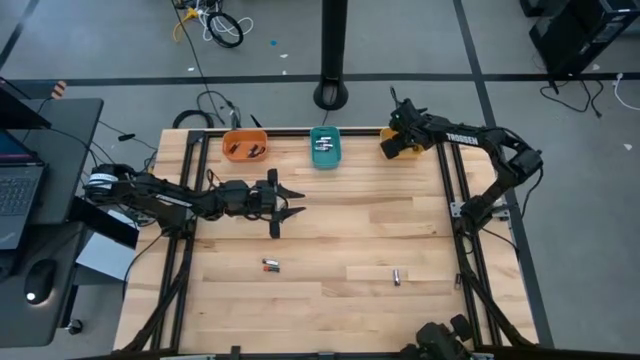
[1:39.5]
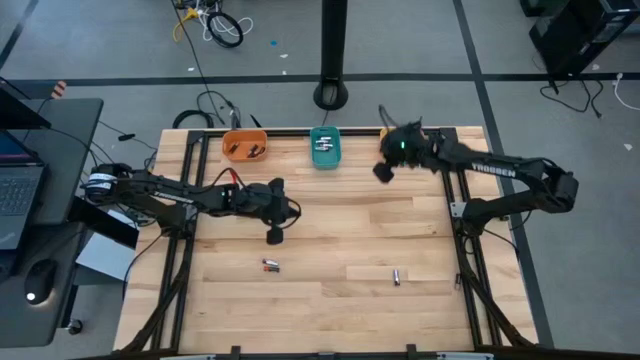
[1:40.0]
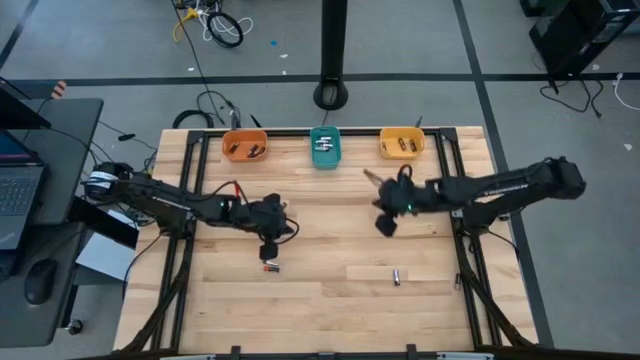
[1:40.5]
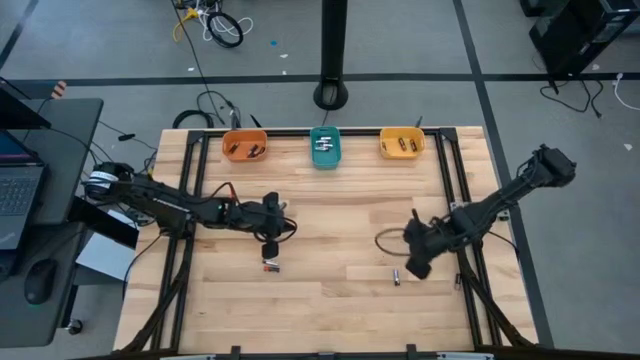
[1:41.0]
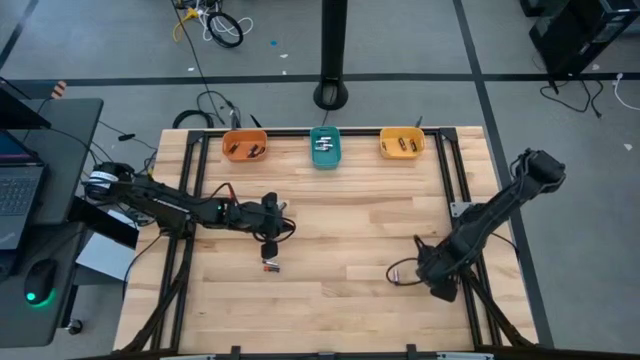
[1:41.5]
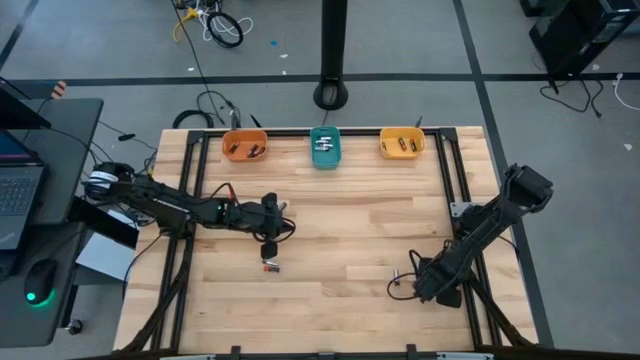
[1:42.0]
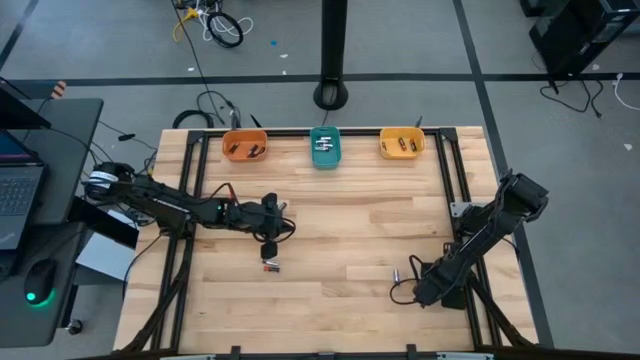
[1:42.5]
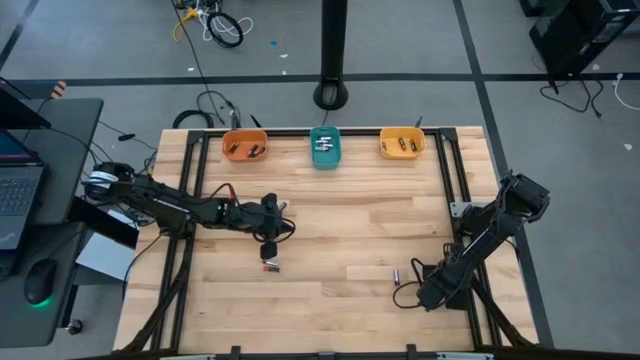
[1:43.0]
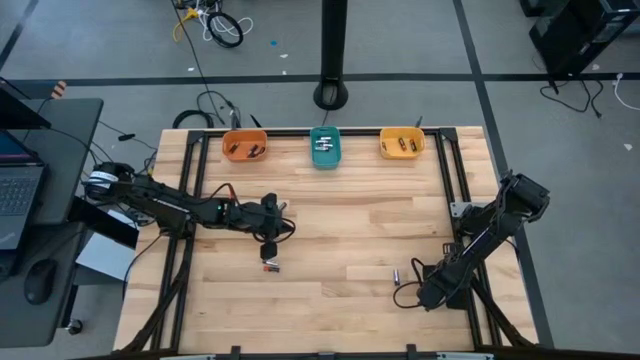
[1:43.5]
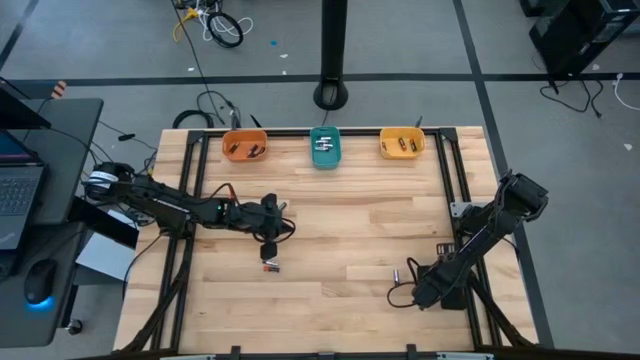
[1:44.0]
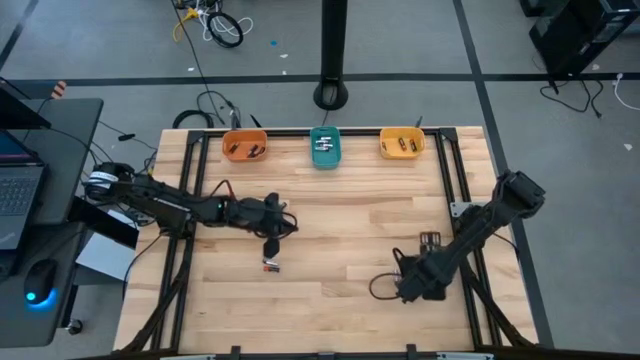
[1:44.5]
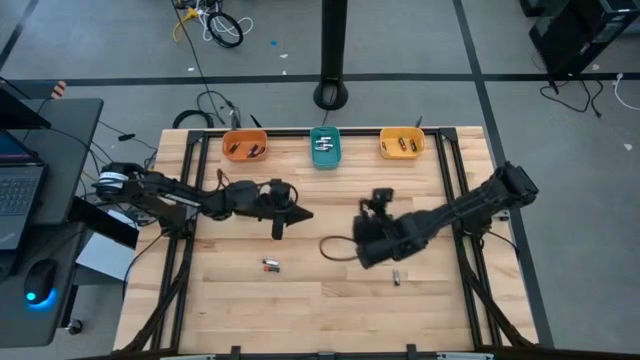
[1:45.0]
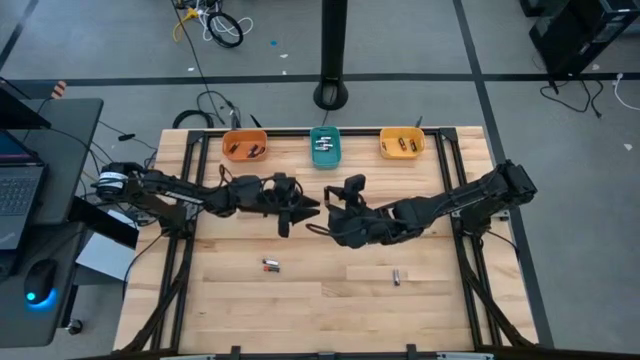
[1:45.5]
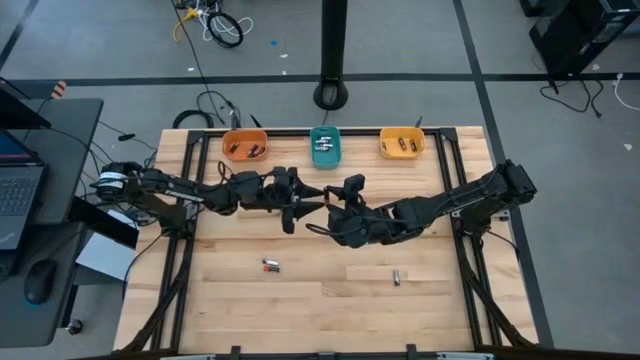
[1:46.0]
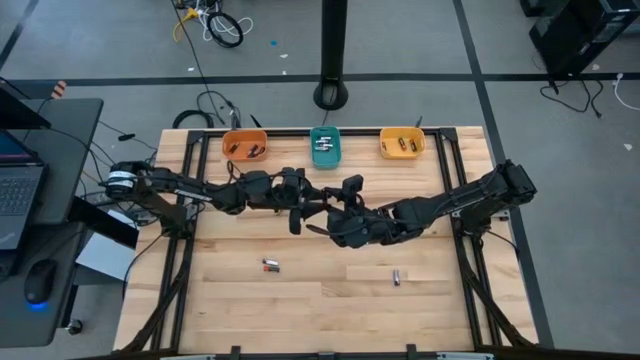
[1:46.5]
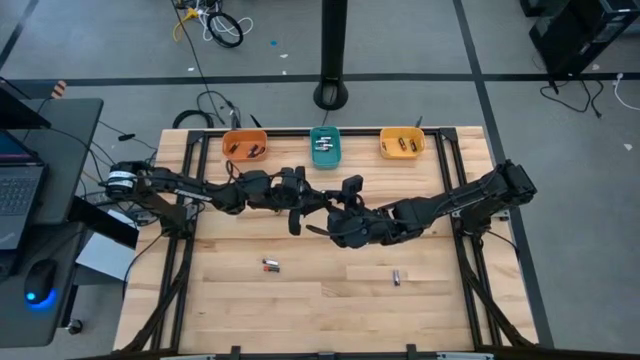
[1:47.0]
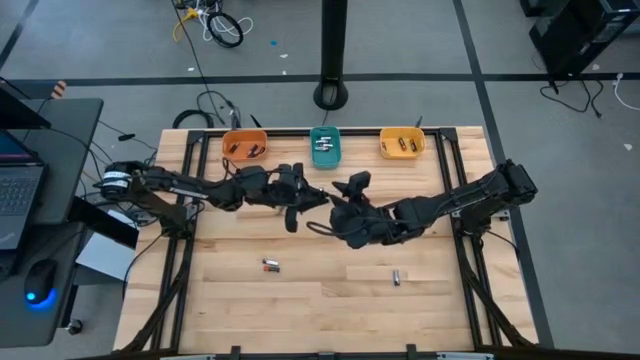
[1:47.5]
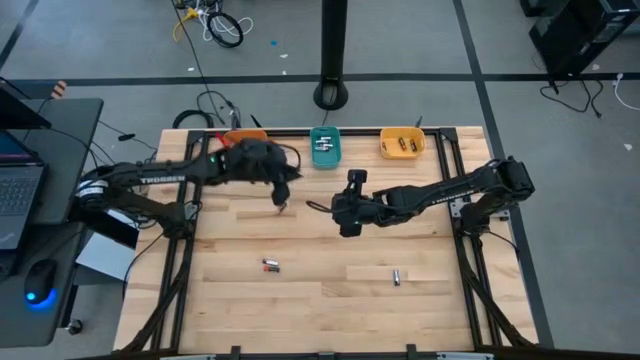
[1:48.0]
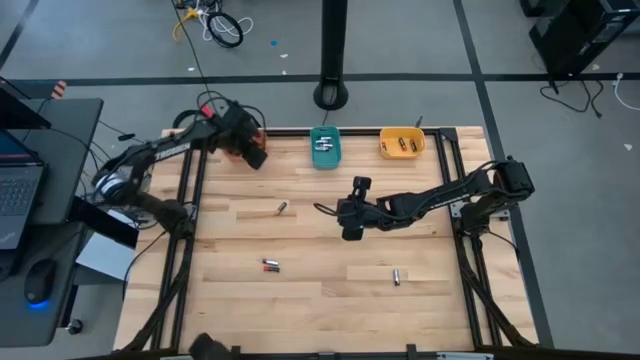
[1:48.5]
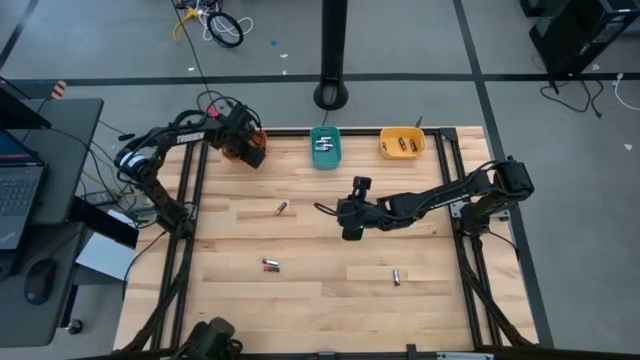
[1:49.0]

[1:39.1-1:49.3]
Task: Sort batteries
Put the brown-black battery in the orange bin

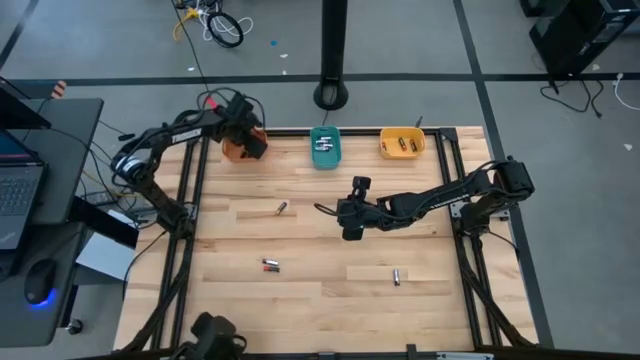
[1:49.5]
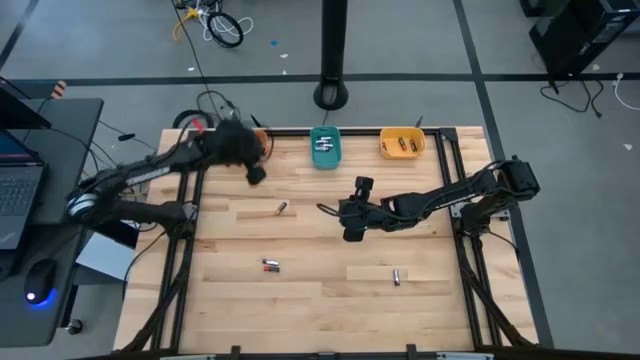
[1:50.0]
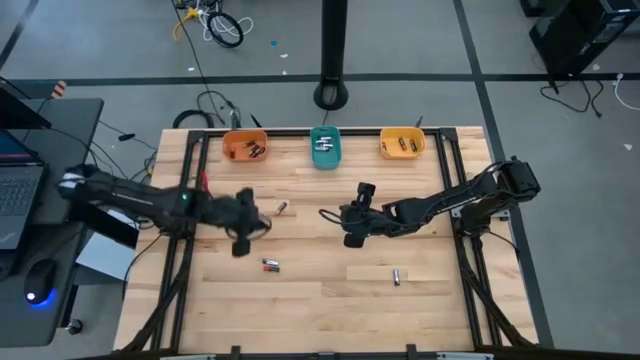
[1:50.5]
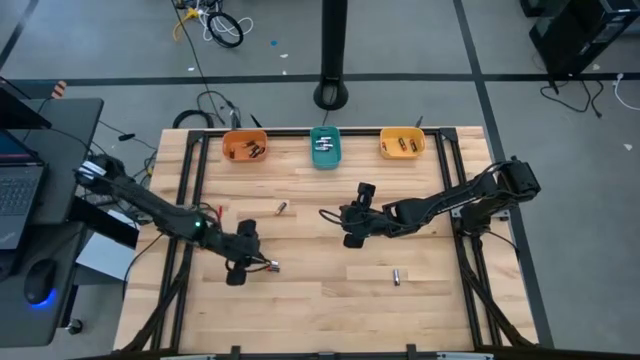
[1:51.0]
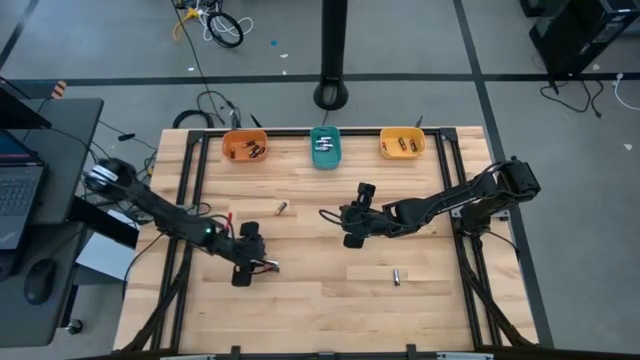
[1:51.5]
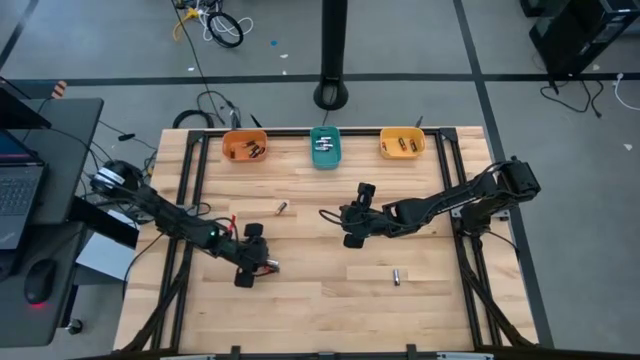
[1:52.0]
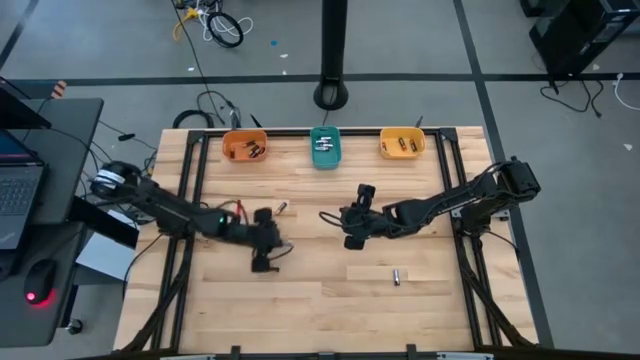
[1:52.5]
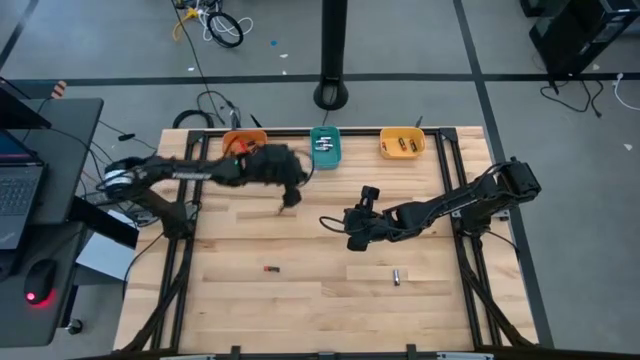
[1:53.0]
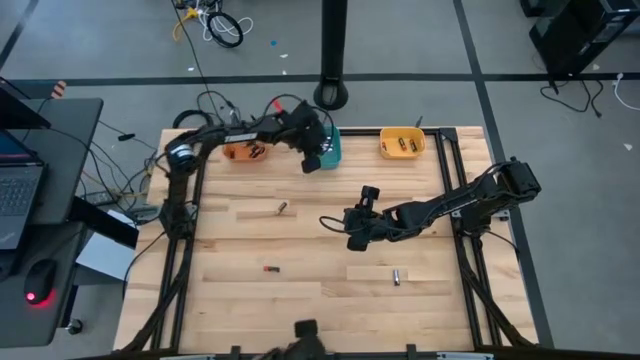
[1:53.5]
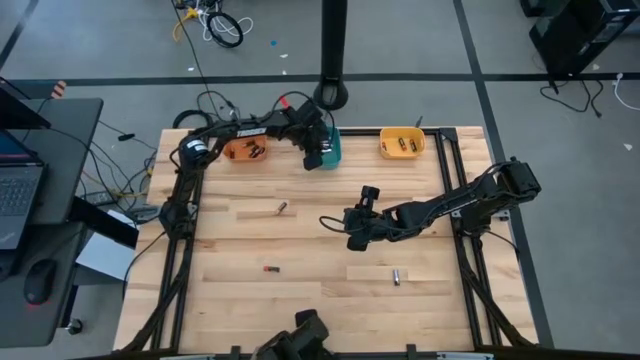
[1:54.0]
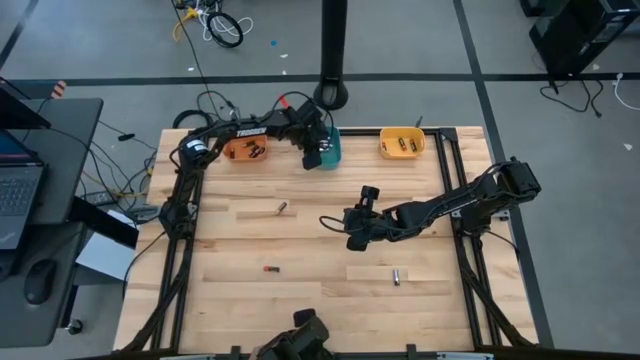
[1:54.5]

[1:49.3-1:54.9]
Put the black-silver battery in the green bin

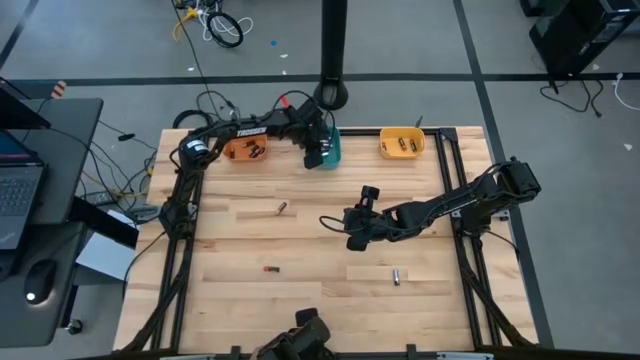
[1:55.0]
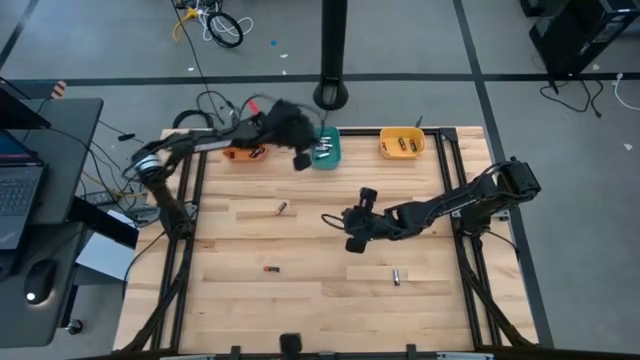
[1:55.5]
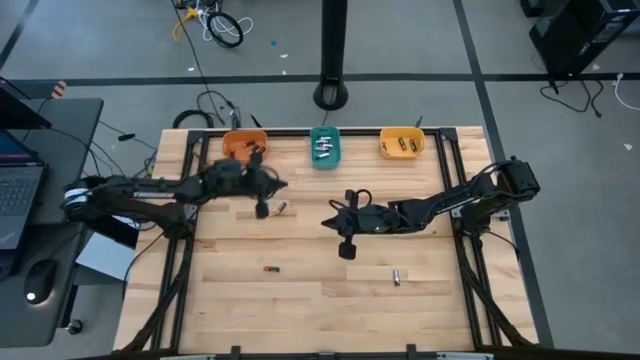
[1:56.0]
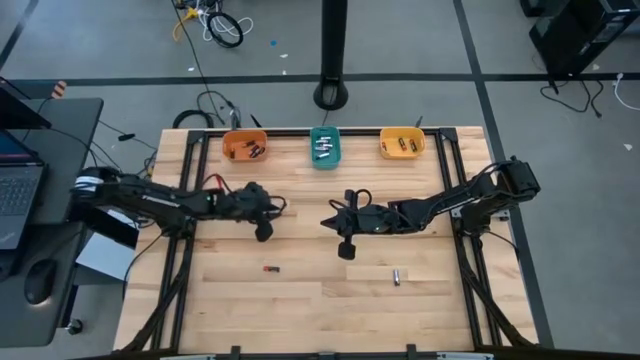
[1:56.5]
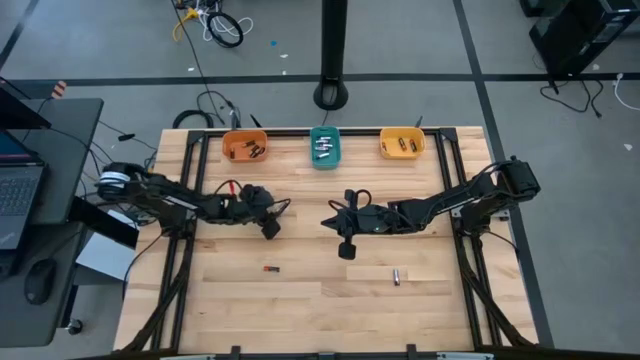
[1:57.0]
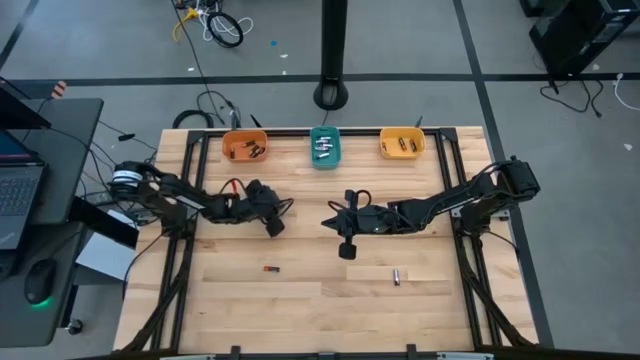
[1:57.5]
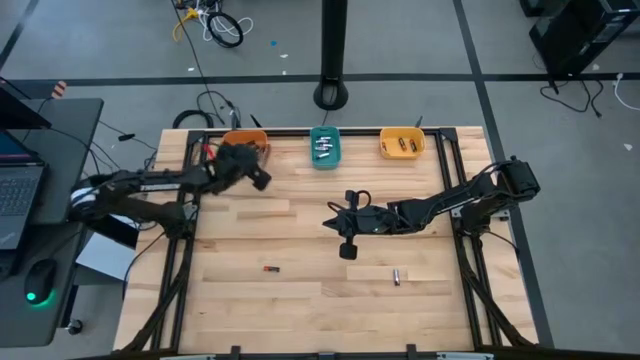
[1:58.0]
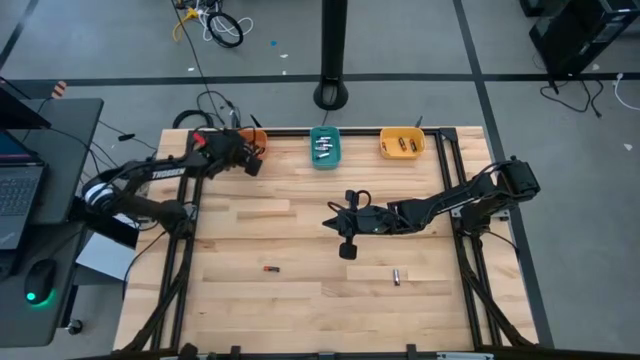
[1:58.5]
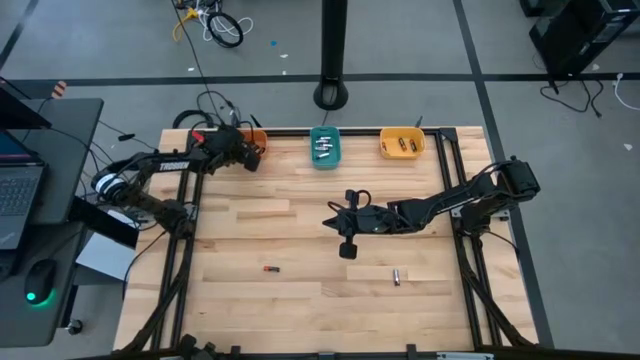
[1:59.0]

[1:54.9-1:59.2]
Put the brown-black battery in the orange bin
